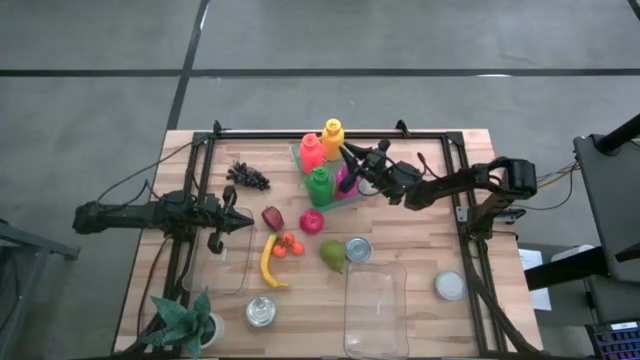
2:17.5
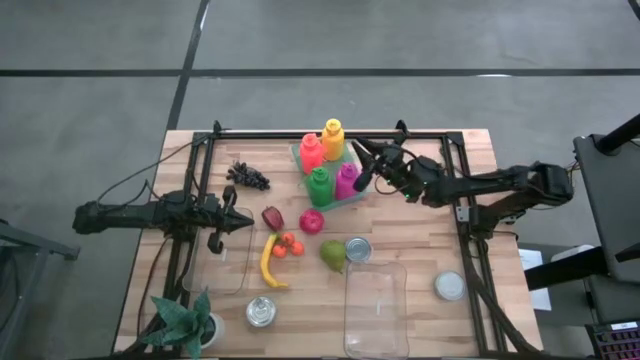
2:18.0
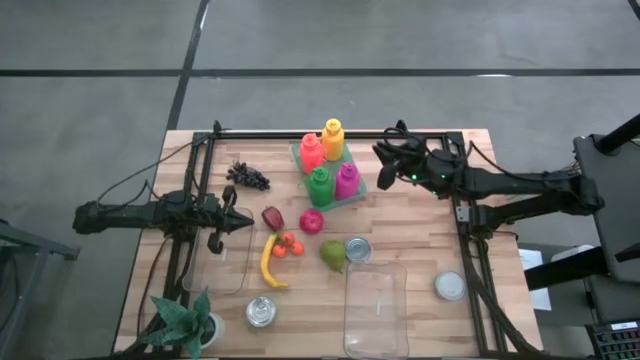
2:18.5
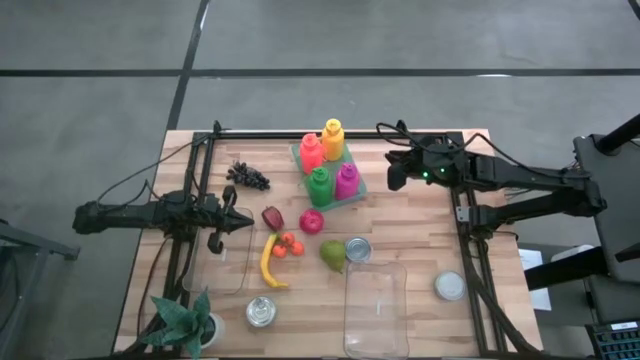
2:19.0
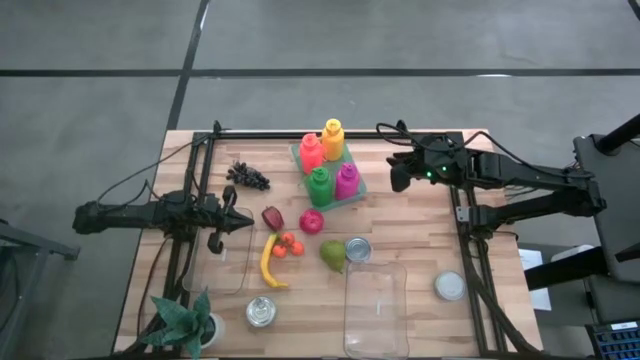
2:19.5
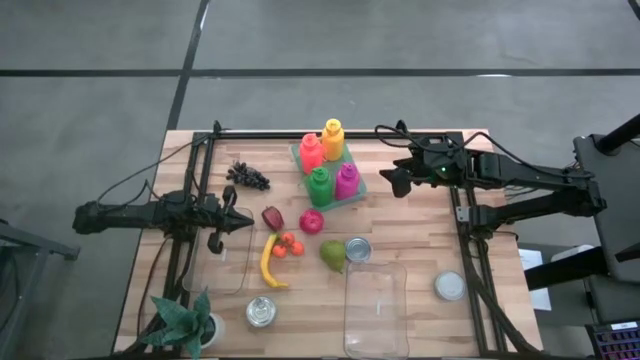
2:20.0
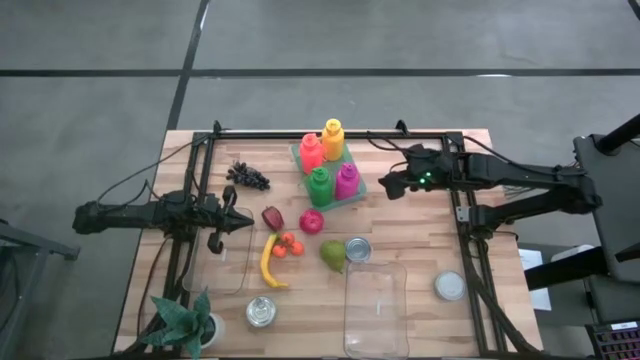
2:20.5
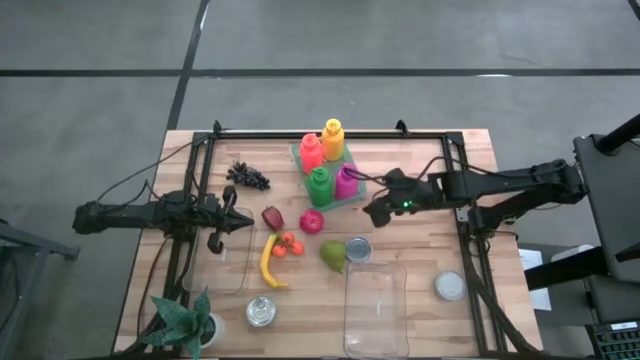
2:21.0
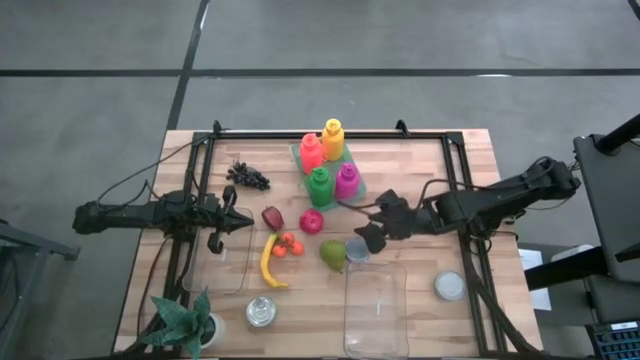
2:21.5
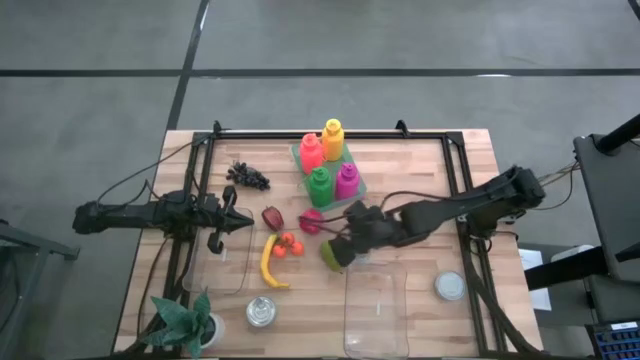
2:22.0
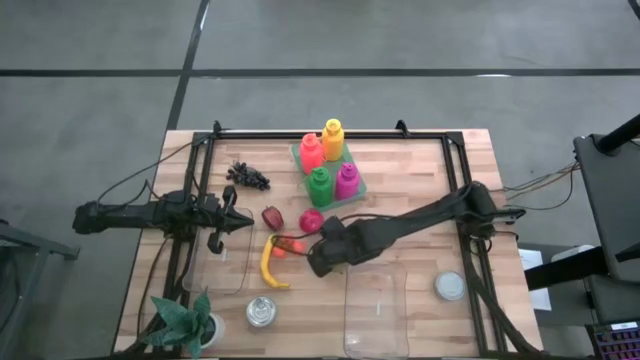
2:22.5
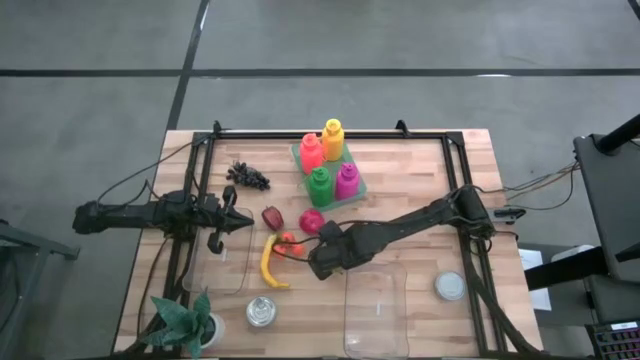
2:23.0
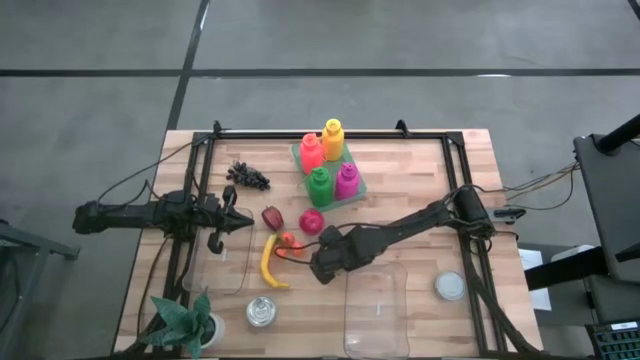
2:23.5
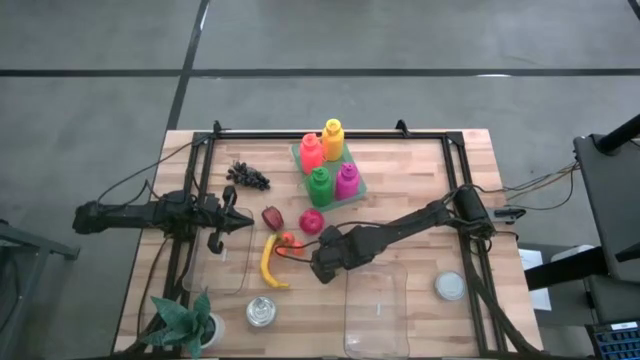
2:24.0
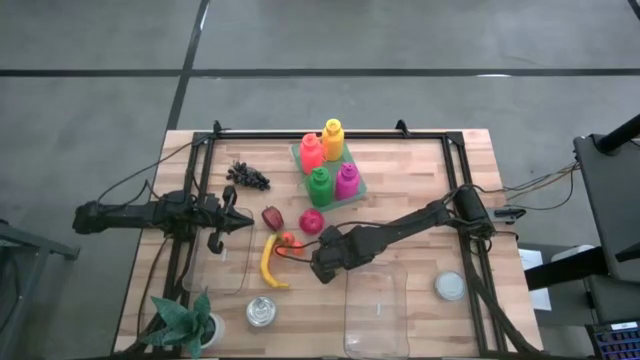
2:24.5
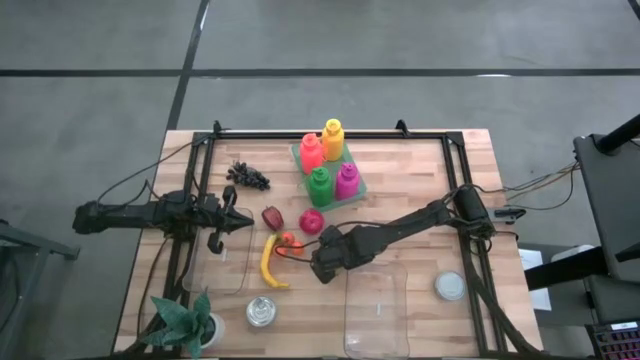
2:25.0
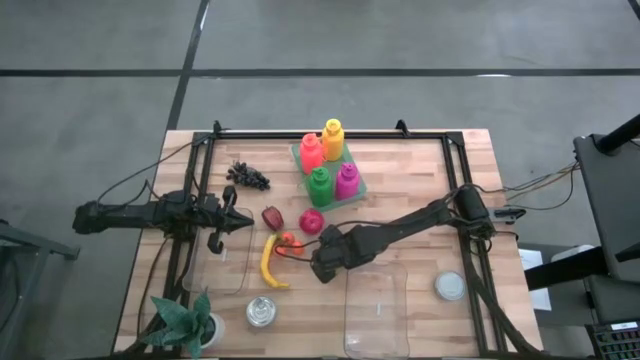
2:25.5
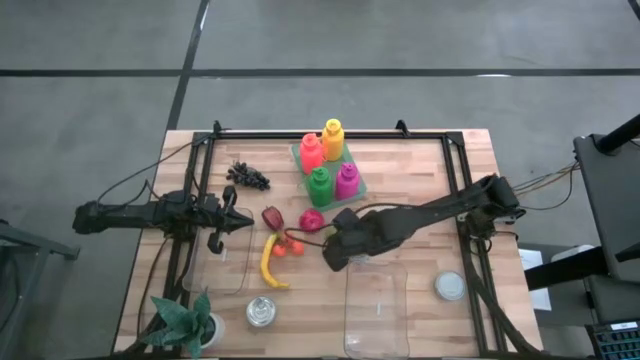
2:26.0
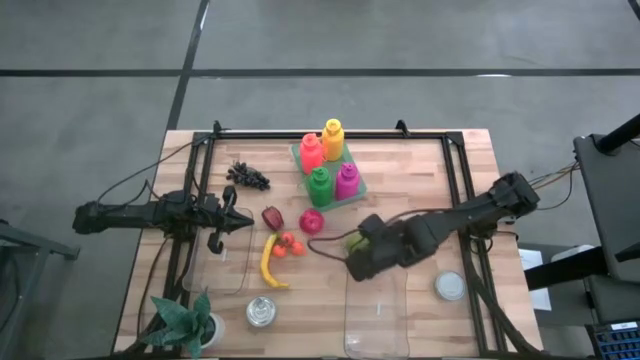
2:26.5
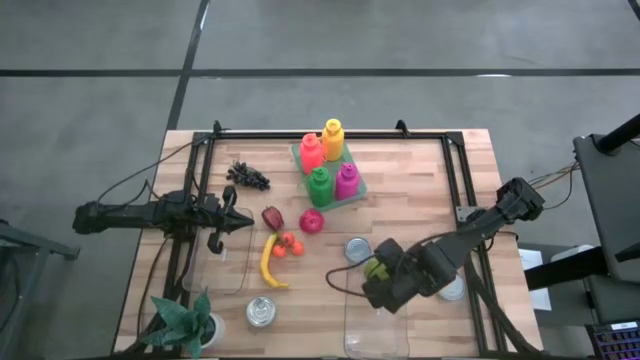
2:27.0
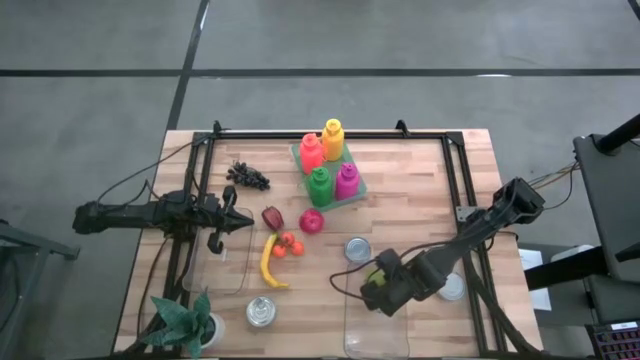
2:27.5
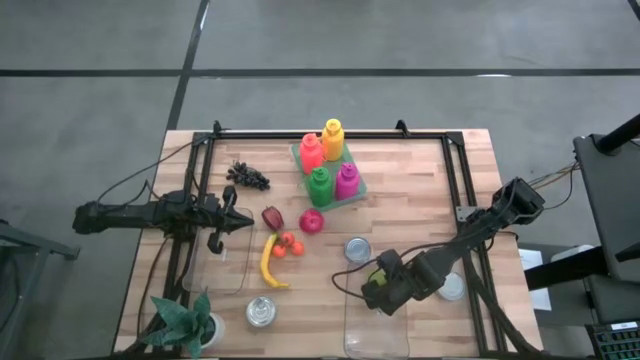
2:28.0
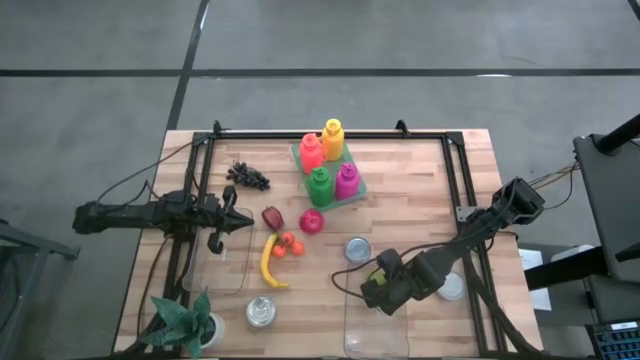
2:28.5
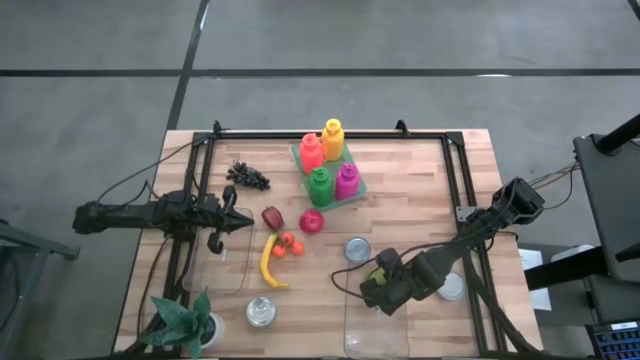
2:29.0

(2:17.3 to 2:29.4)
Task: Pick & Place Food Item
Put the green pear into the bottom transparent bin

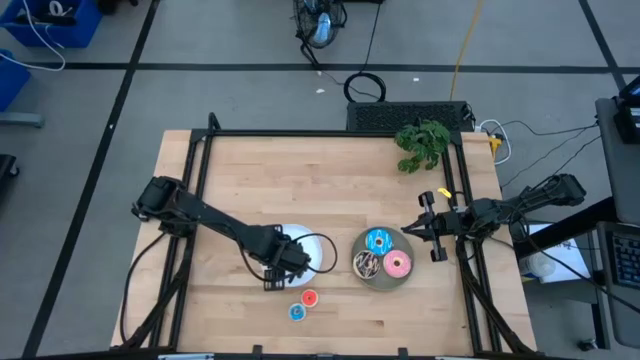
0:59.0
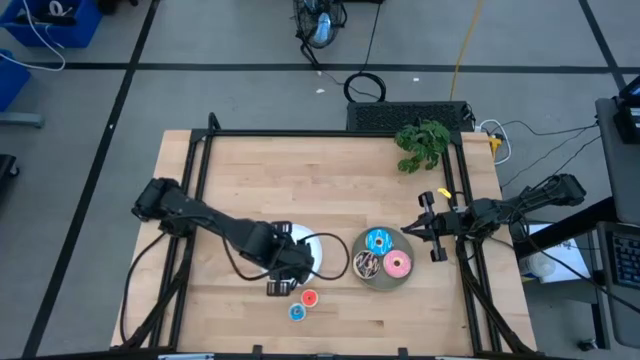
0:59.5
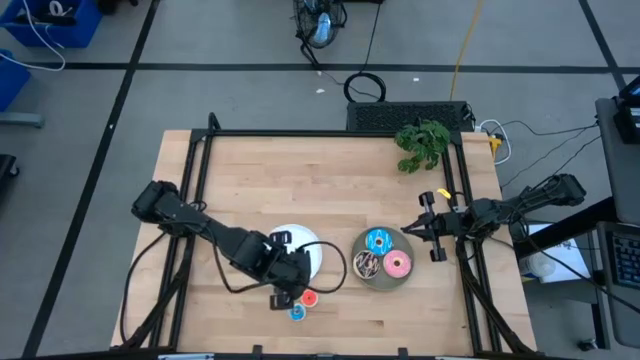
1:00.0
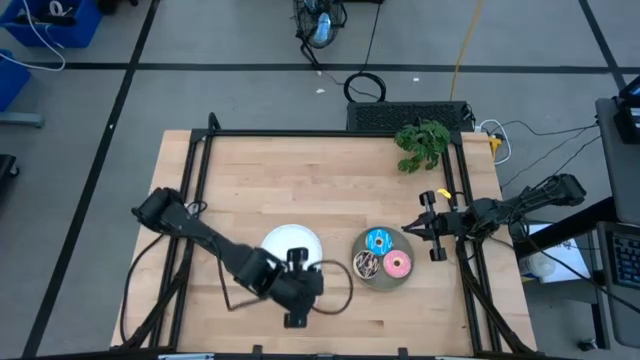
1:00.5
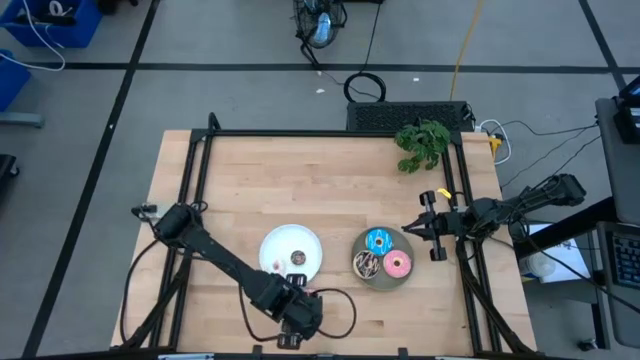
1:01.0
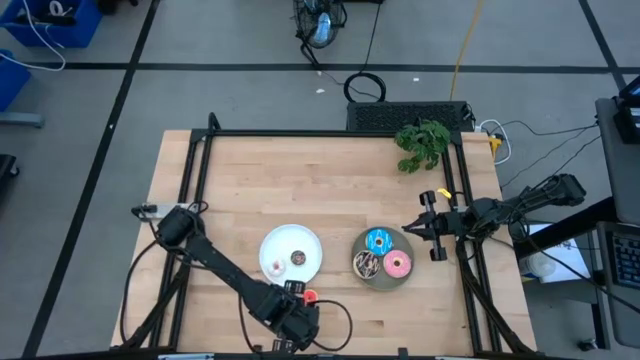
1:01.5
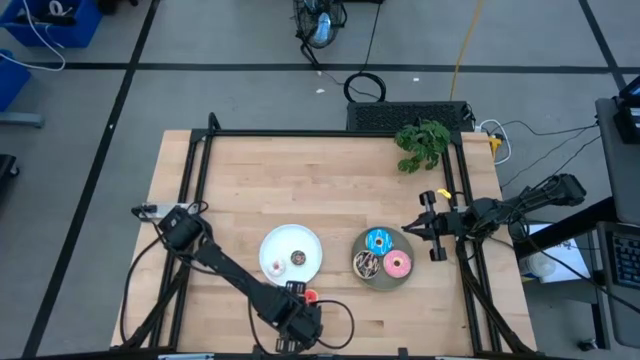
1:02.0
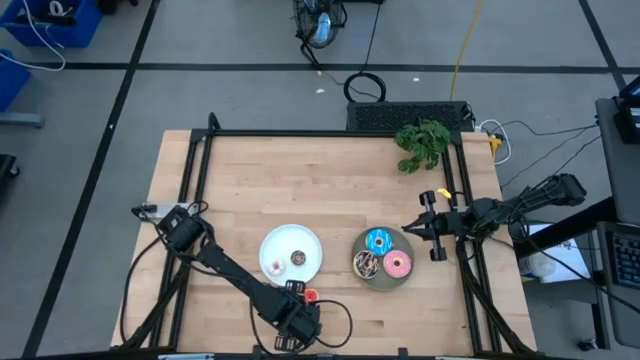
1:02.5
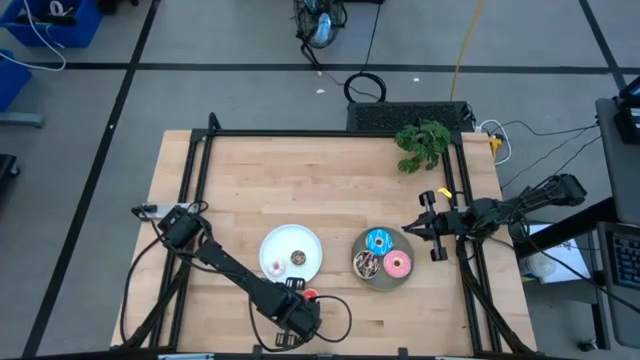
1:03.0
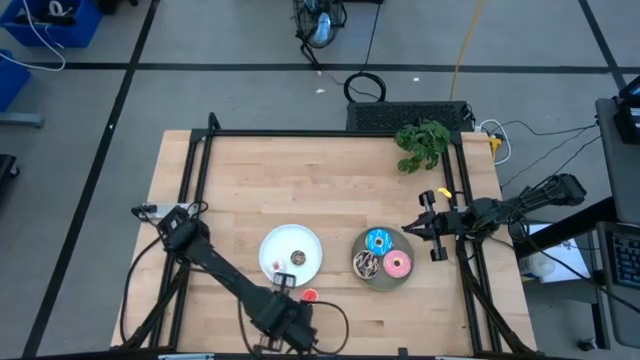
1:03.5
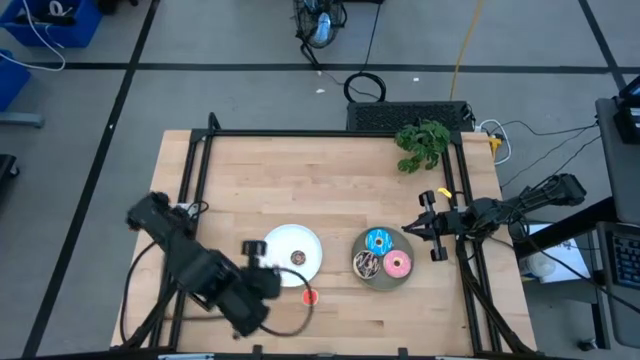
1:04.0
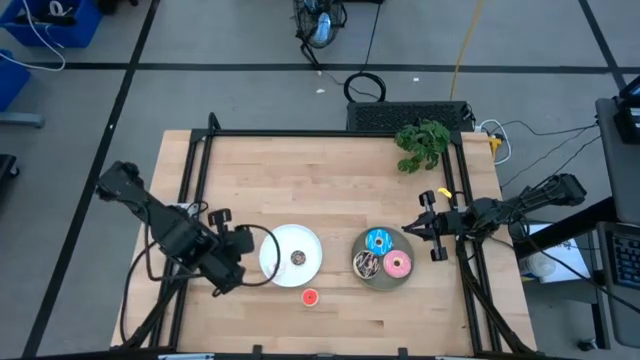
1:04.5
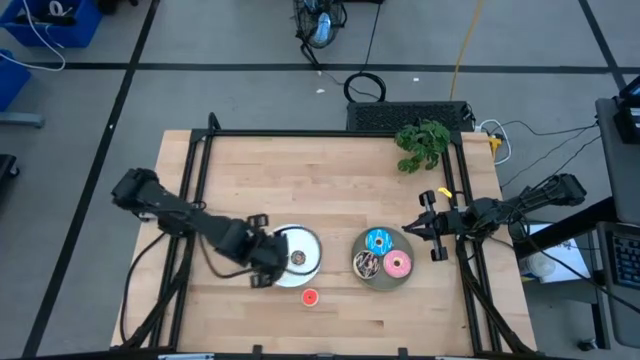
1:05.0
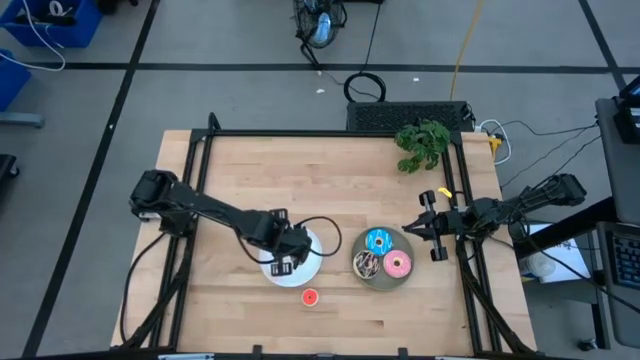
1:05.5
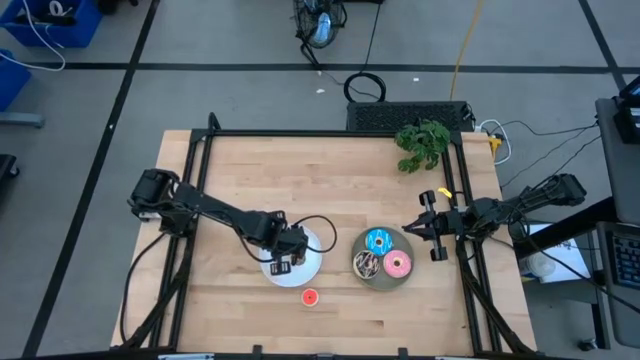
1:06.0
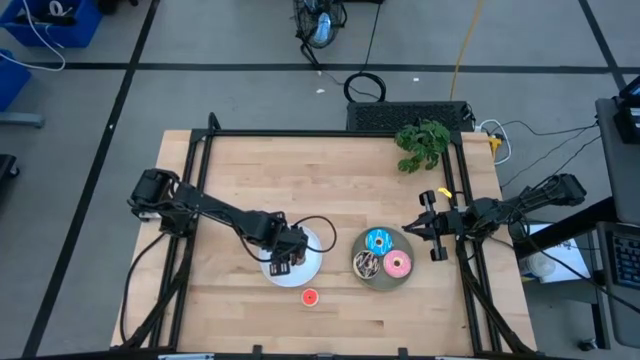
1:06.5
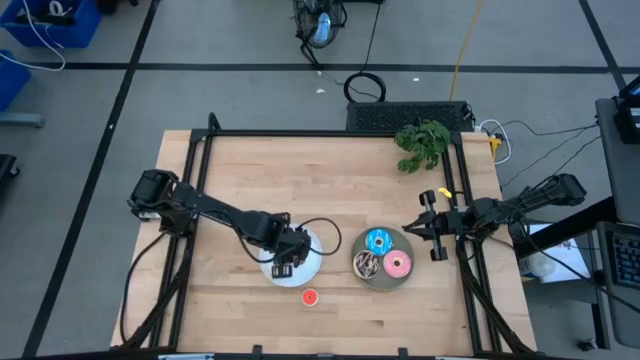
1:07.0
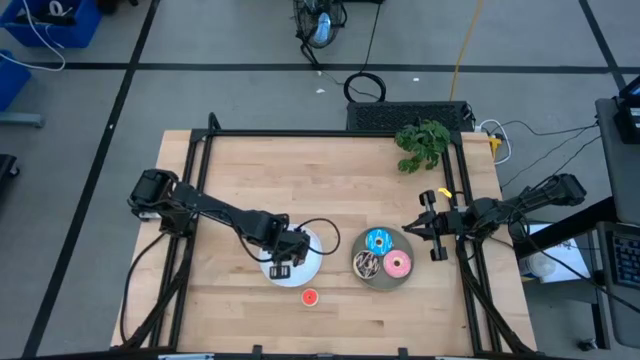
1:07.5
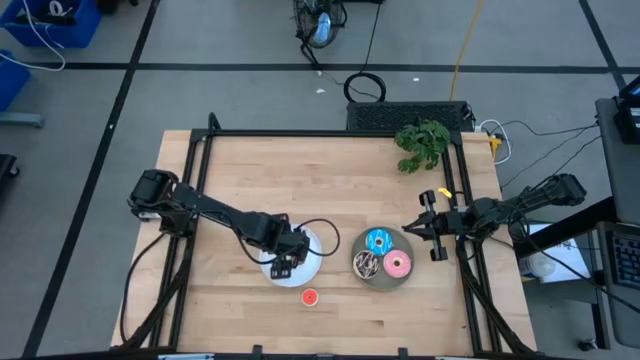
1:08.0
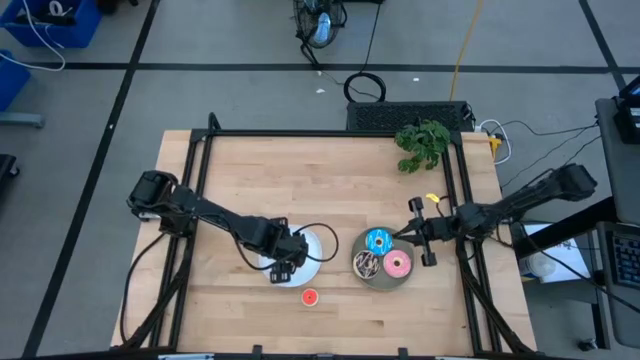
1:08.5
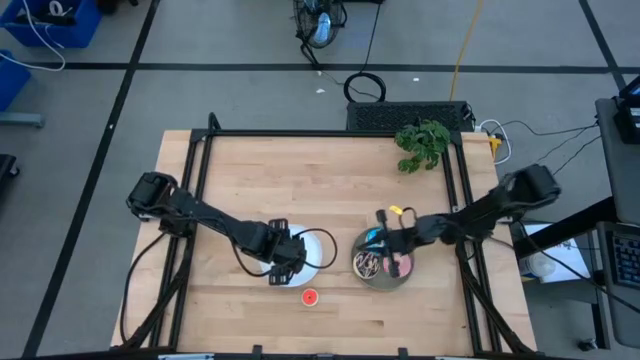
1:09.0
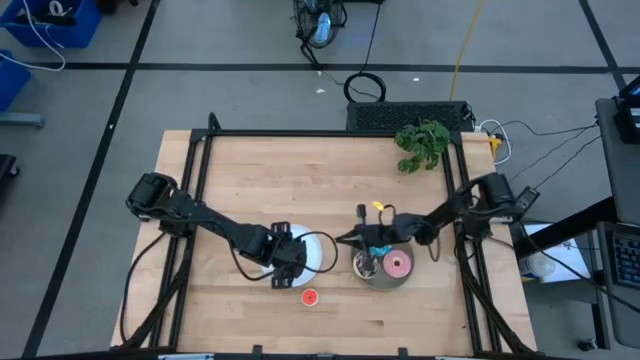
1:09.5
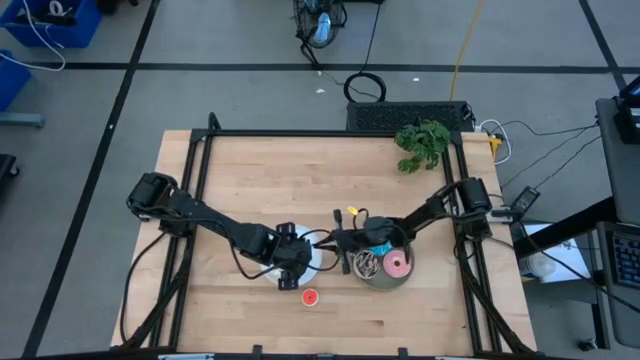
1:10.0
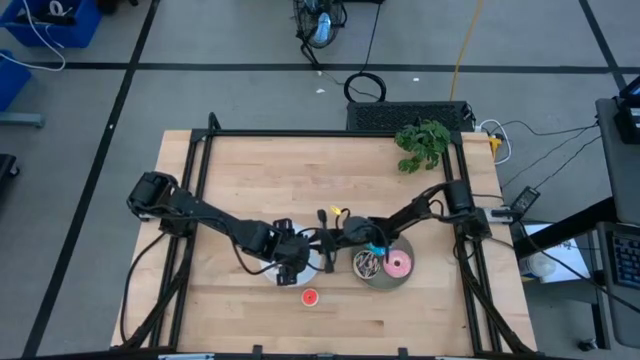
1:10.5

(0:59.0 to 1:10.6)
Task: Pick & Place donuts
Put the small blue donut on the white plate
